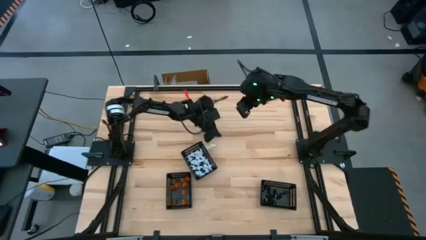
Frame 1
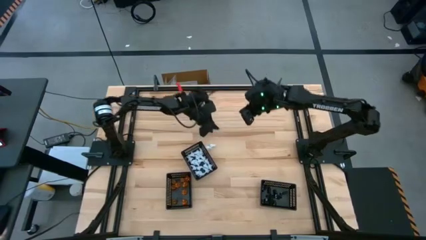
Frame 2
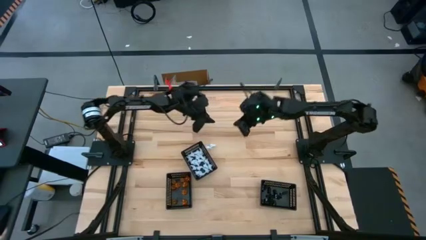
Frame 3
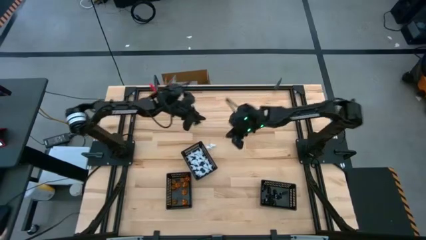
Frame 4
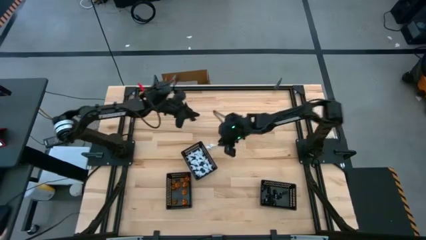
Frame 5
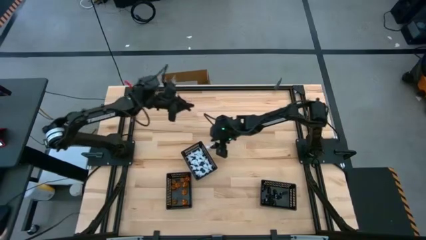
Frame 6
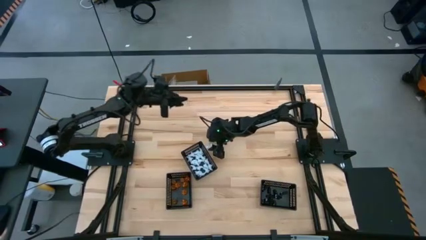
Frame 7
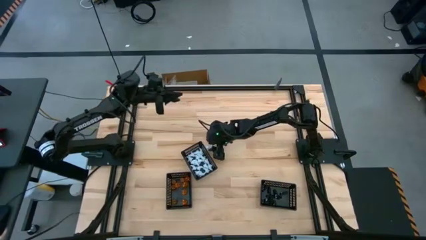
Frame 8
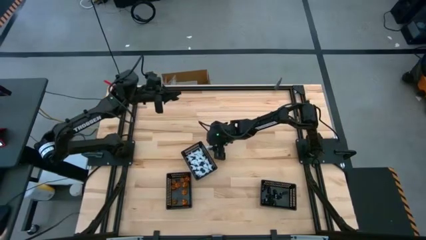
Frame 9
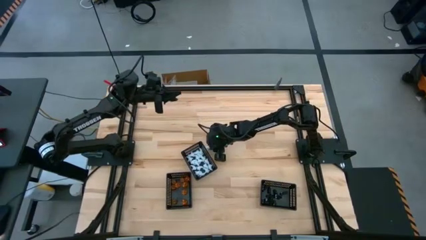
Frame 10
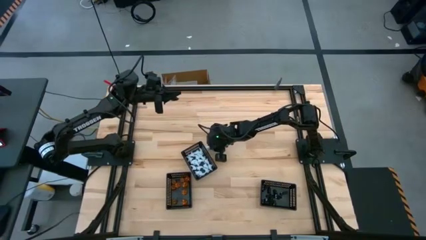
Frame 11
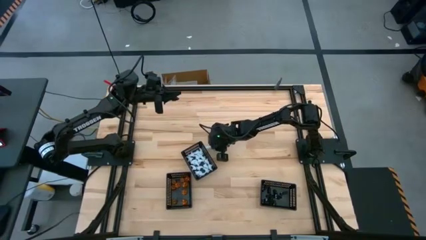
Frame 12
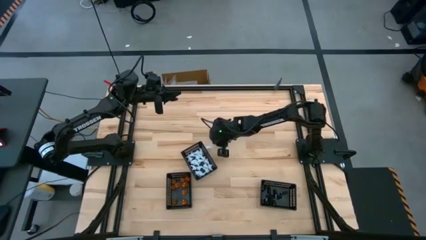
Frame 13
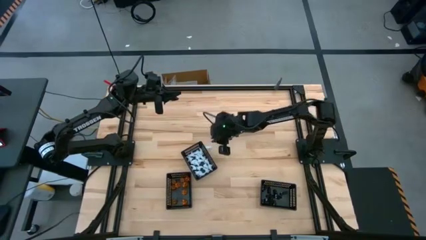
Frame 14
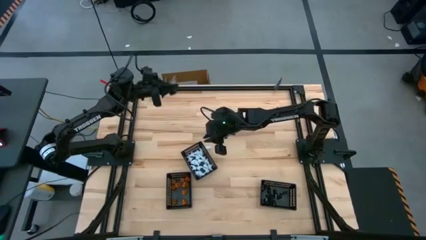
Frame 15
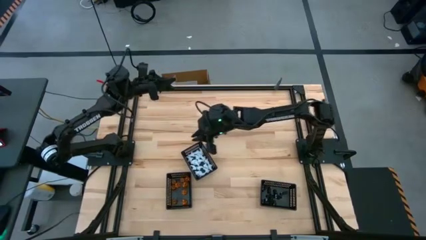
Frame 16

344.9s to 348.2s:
Task: Sort Halloween decoration
Put the white ghost toy into the middle black basket

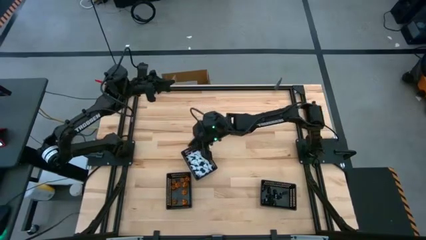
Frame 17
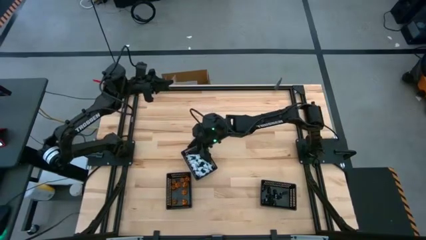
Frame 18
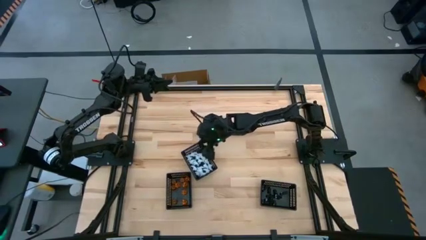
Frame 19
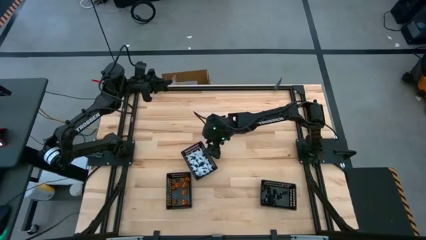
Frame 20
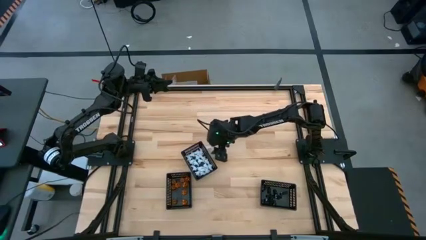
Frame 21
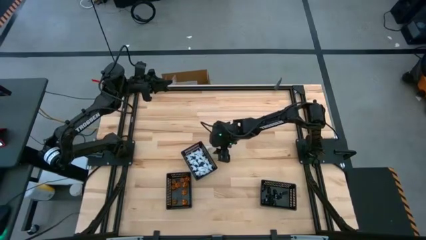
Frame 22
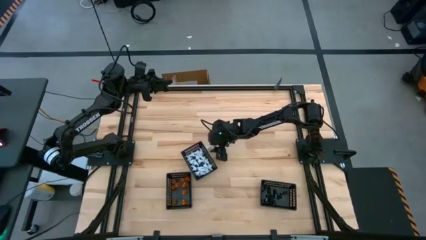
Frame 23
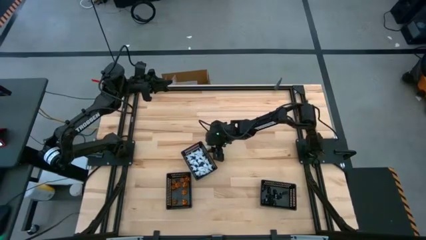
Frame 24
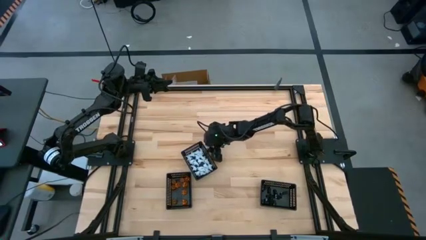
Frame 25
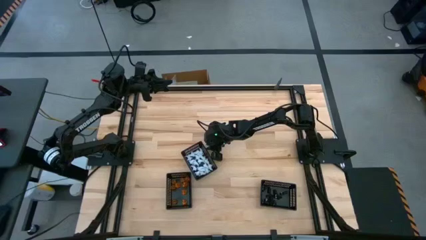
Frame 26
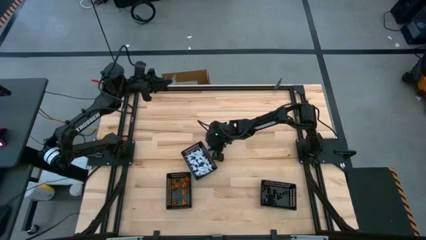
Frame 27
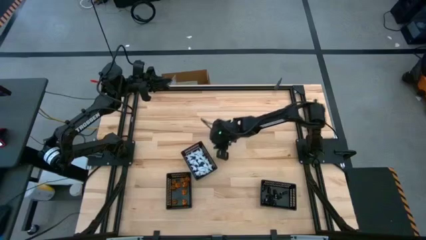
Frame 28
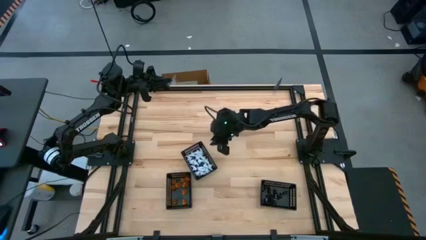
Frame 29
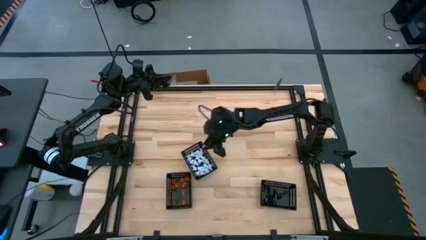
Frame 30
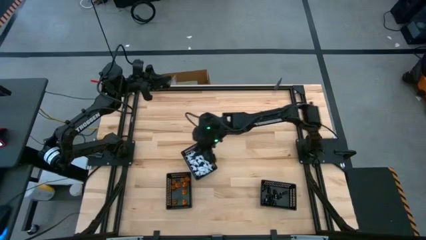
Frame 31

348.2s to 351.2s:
Put the white ghost toy into the middle black basket

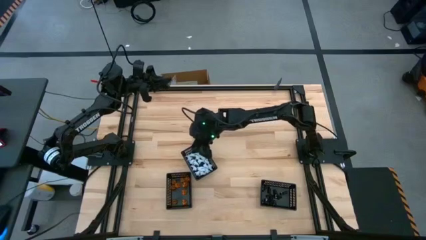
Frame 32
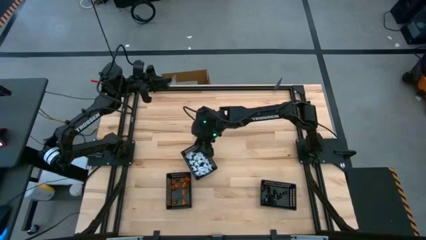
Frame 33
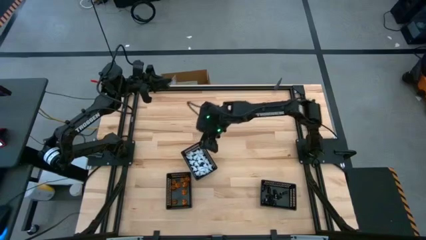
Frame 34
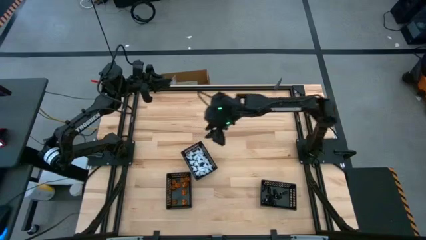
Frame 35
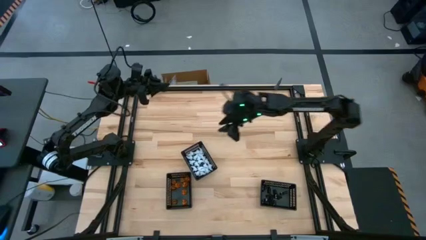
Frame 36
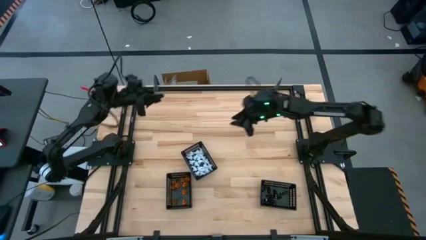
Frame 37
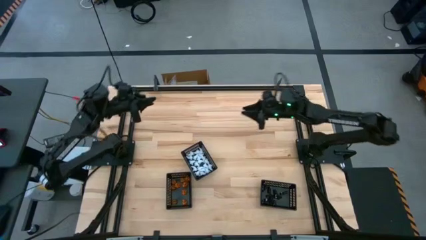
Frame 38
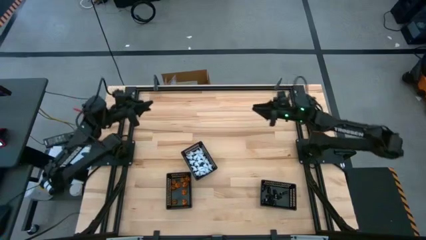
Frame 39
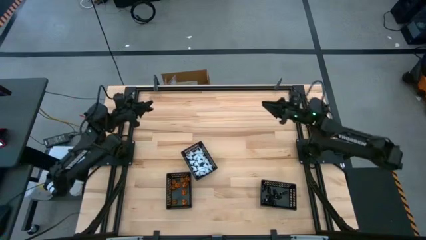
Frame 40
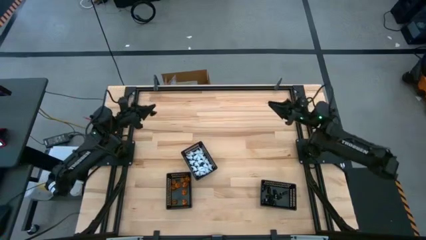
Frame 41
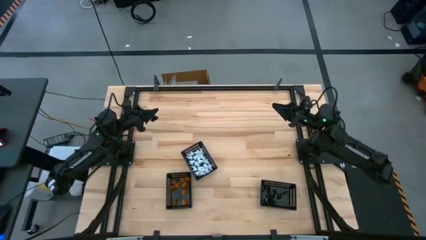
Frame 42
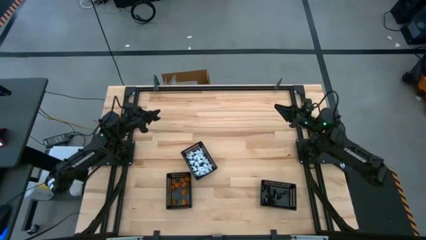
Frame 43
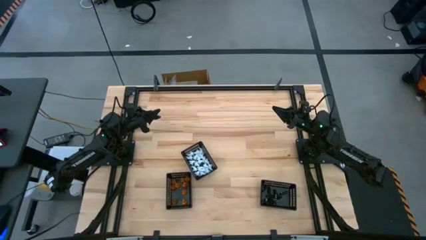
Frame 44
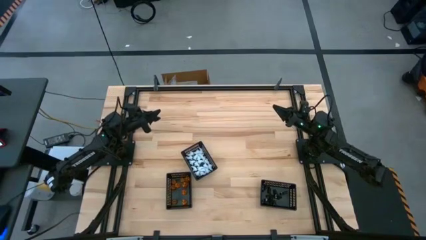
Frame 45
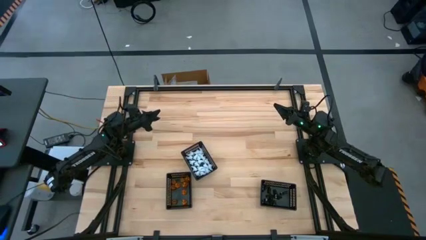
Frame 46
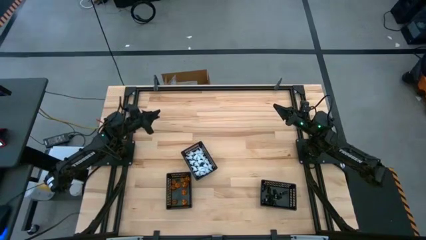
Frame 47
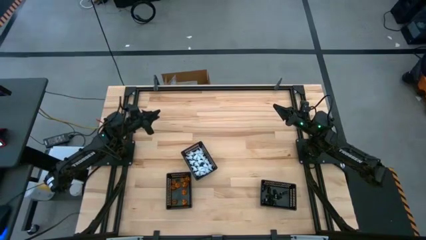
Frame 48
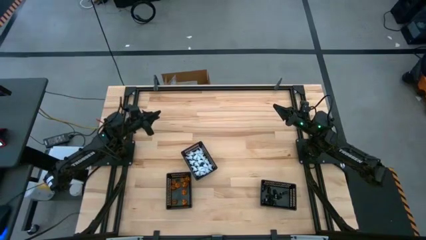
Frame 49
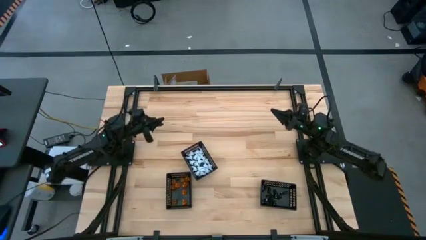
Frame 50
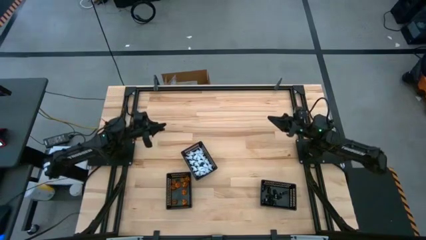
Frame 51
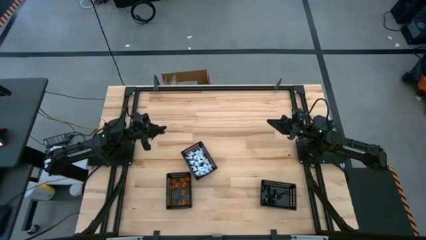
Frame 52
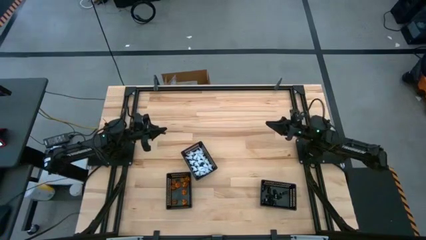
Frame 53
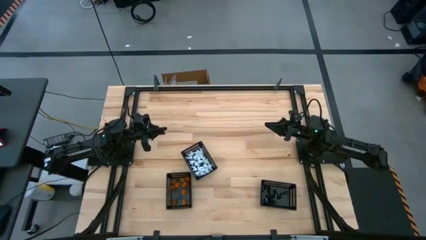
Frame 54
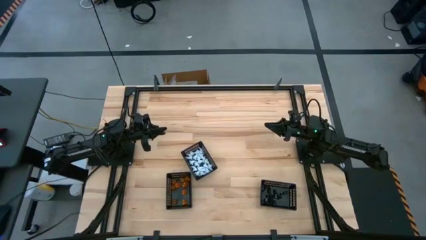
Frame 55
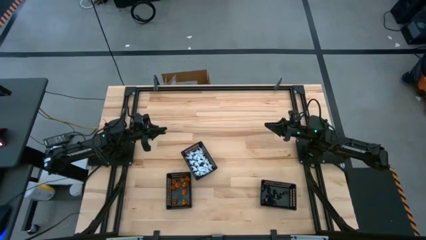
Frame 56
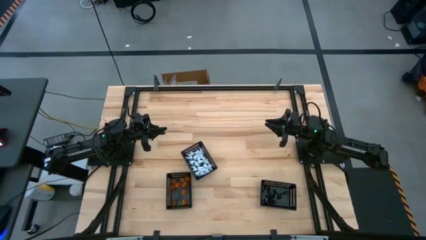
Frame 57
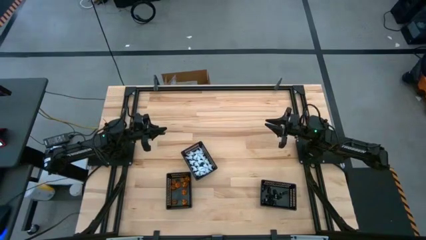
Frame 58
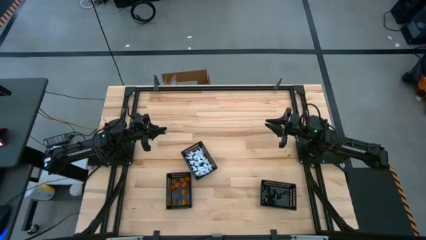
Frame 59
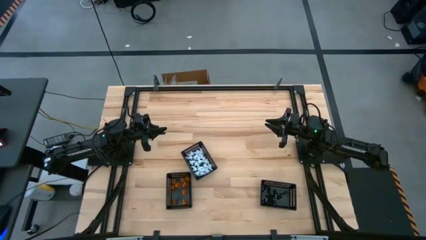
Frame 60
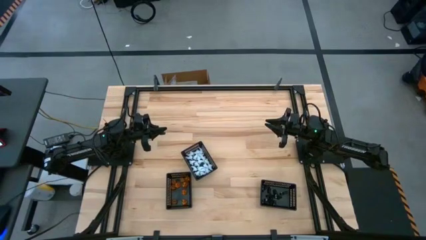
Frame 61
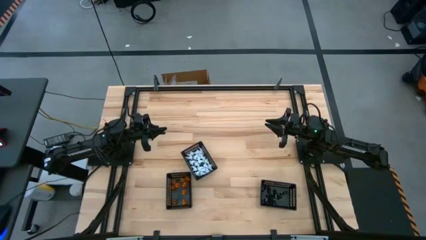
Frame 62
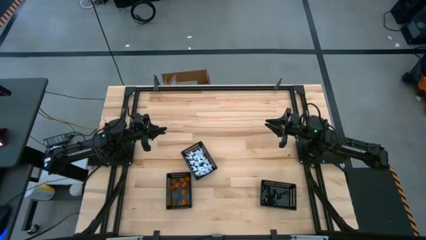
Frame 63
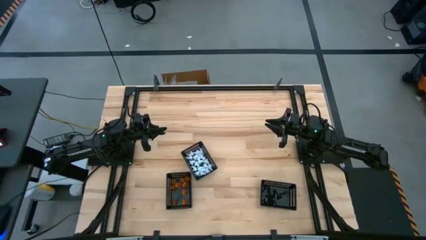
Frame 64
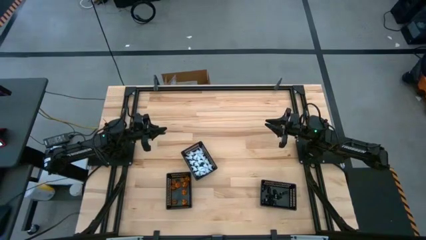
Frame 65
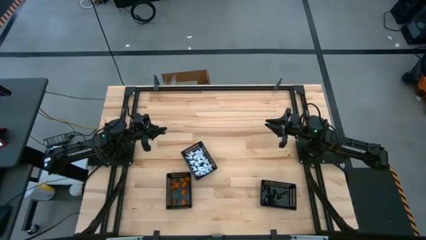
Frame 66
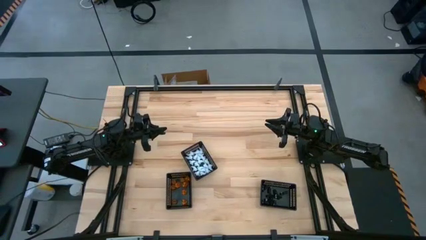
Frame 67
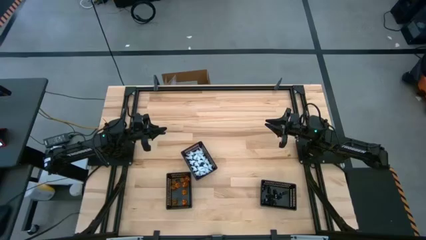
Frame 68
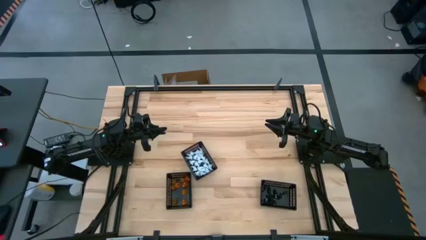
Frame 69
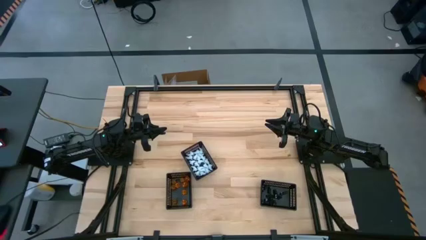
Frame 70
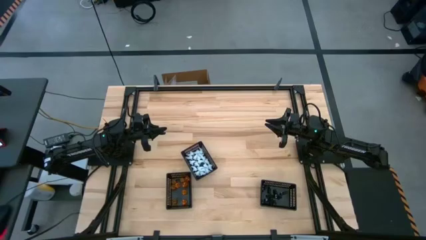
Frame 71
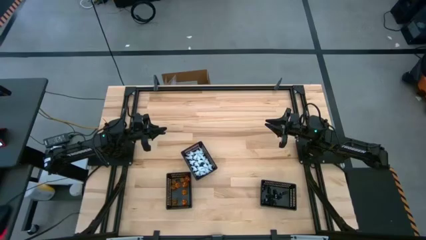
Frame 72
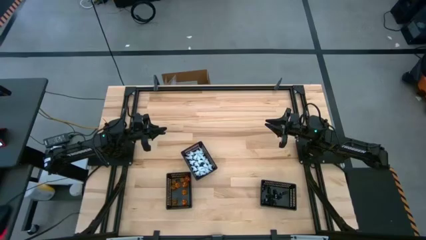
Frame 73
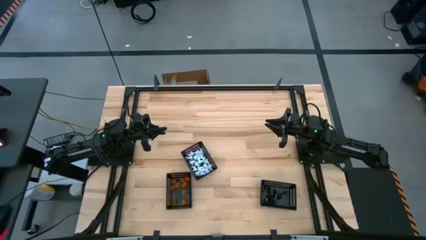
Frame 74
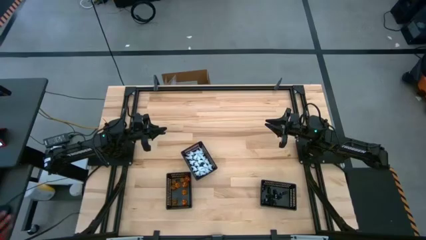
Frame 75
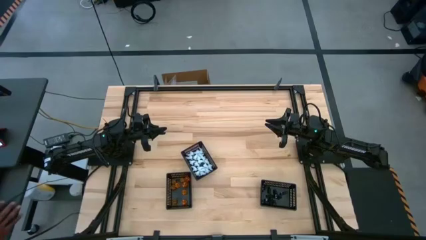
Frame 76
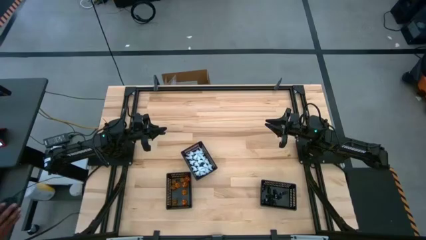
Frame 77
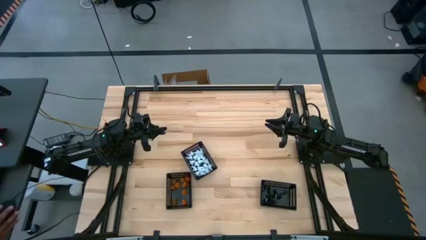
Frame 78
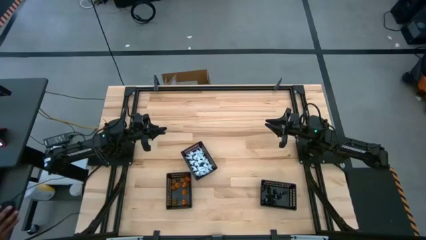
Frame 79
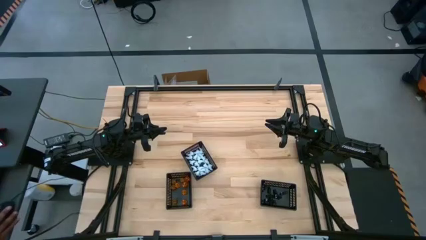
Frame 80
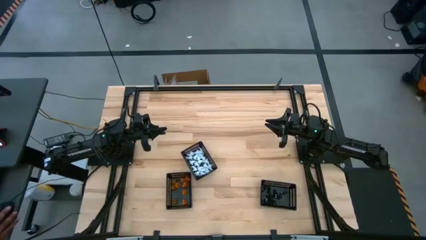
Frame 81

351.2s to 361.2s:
Return to Home Position
